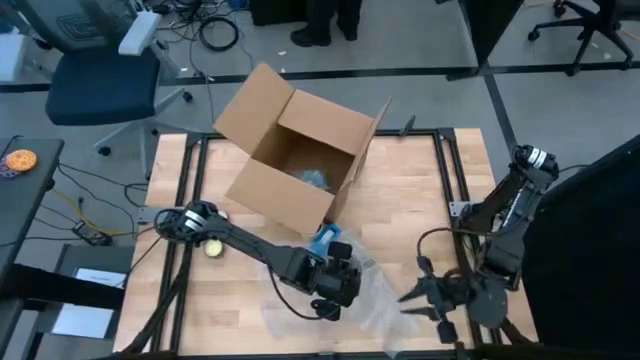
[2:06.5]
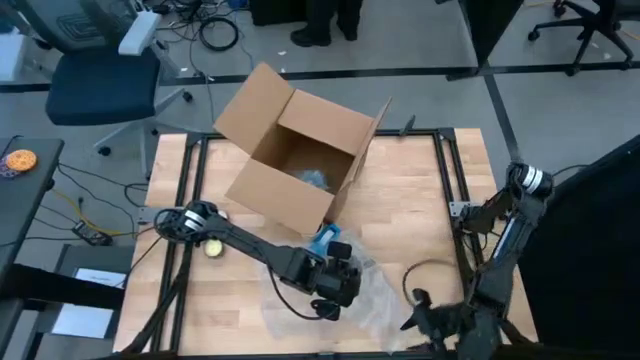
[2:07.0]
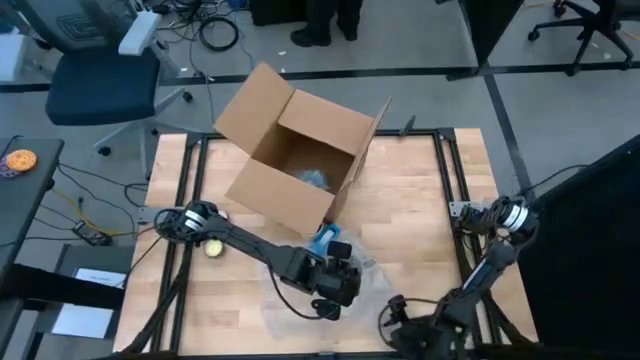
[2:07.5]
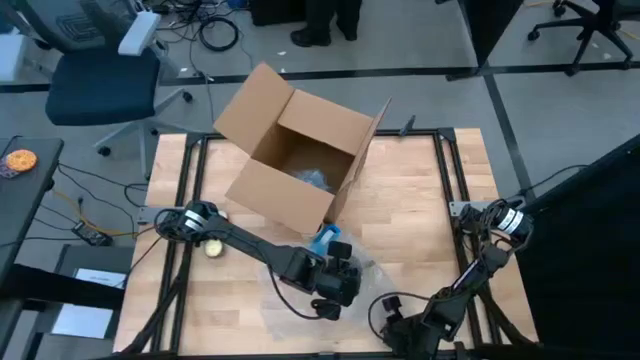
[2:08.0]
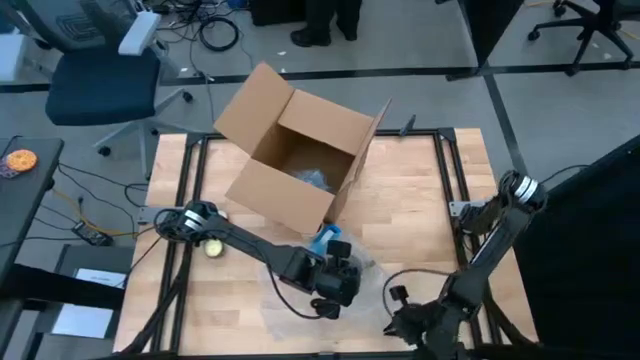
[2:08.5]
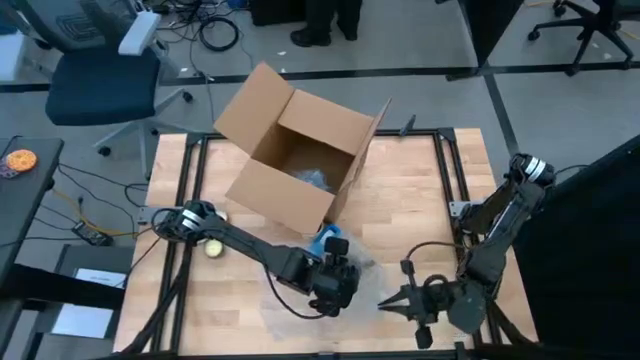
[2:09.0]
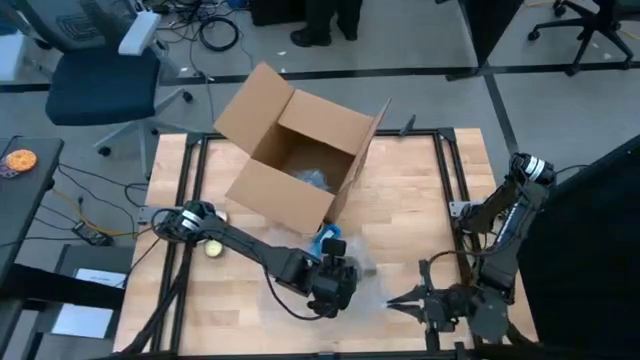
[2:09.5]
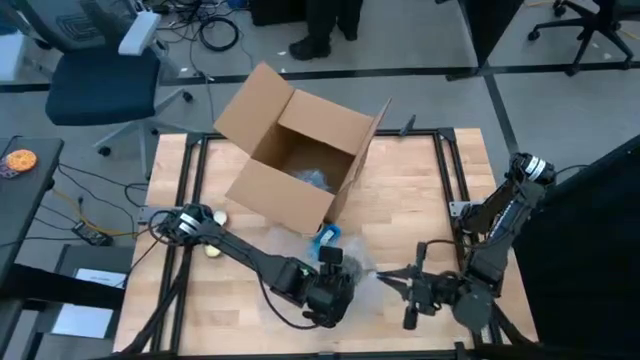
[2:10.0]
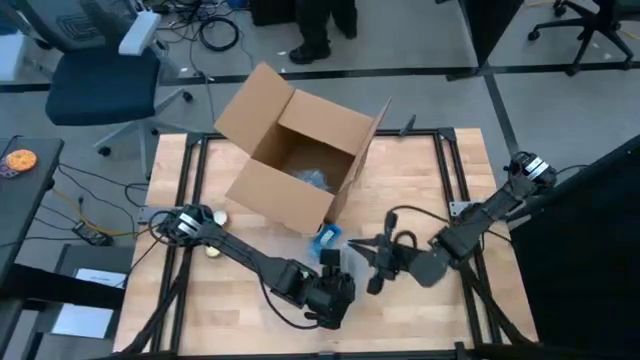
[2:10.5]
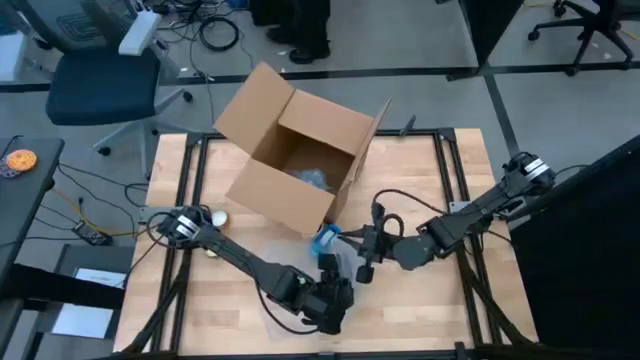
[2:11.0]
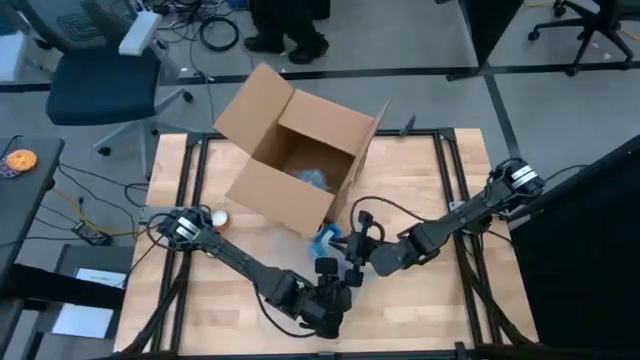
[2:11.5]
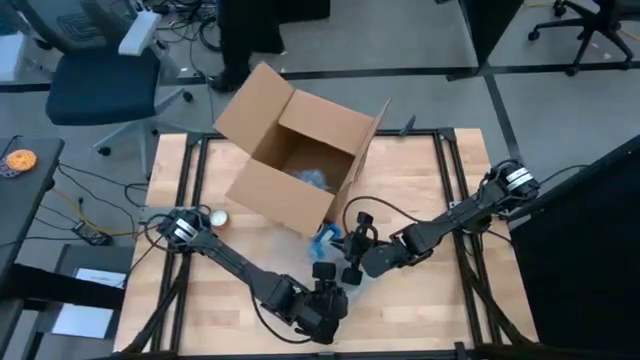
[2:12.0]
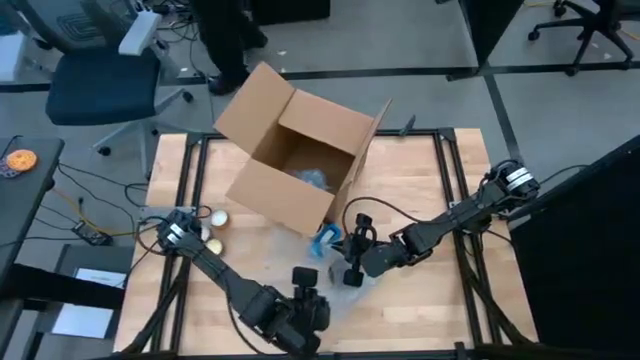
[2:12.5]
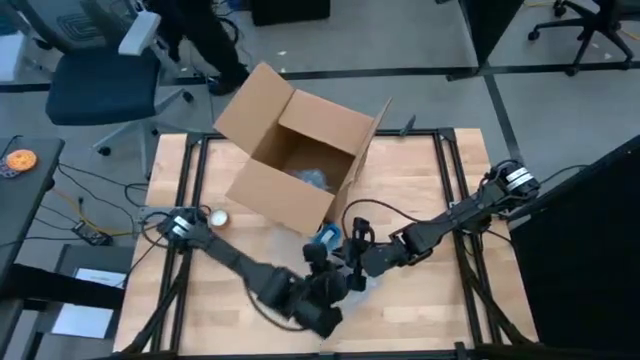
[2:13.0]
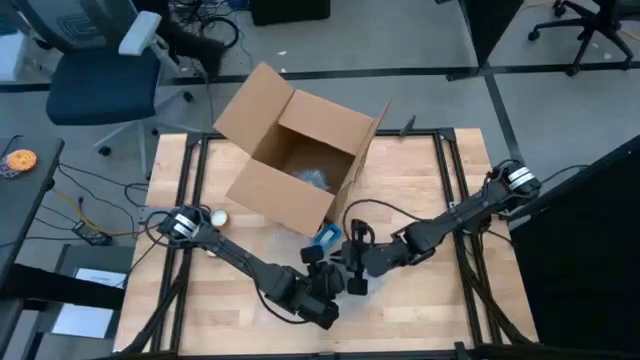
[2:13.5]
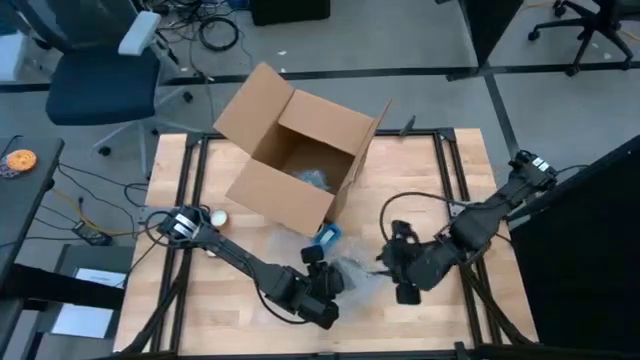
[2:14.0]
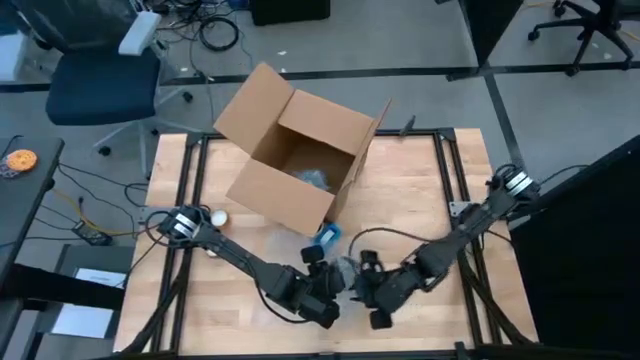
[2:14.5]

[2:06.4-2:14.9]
Task: wrap mug
Wrap the brown mug with the bubble wrap on the table

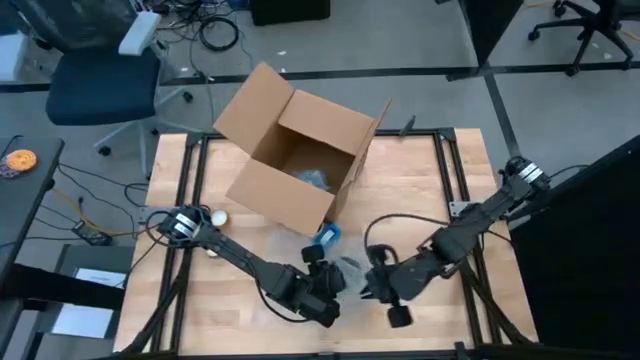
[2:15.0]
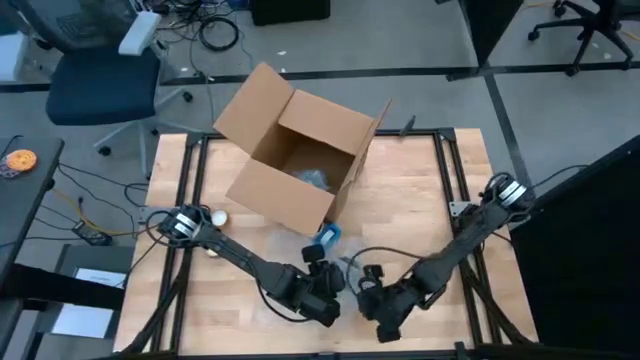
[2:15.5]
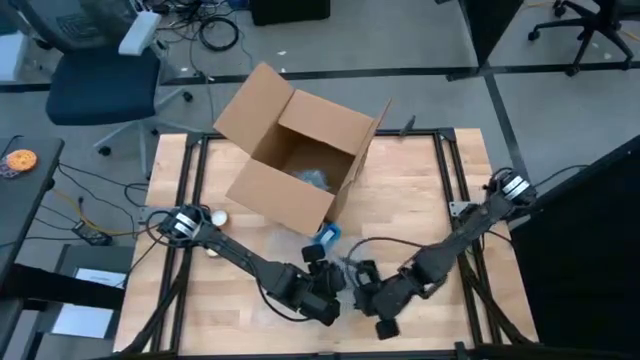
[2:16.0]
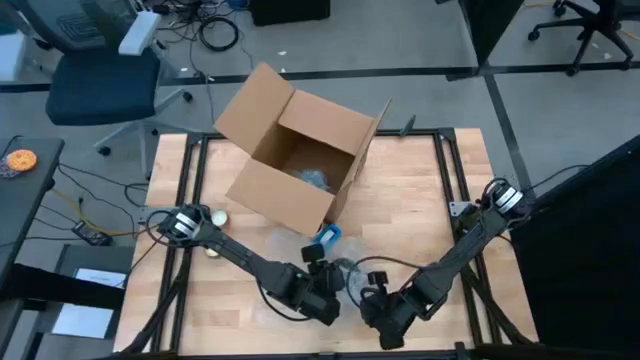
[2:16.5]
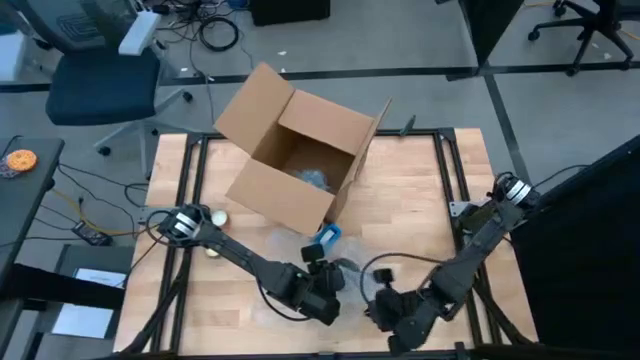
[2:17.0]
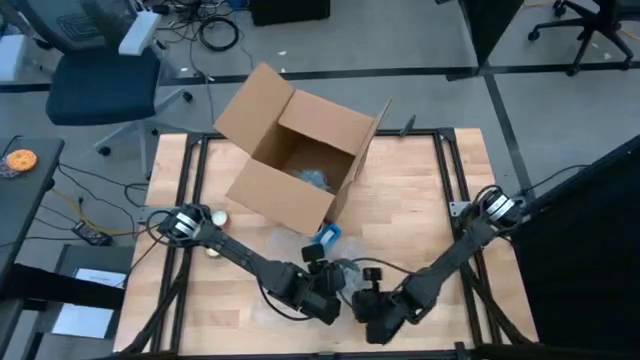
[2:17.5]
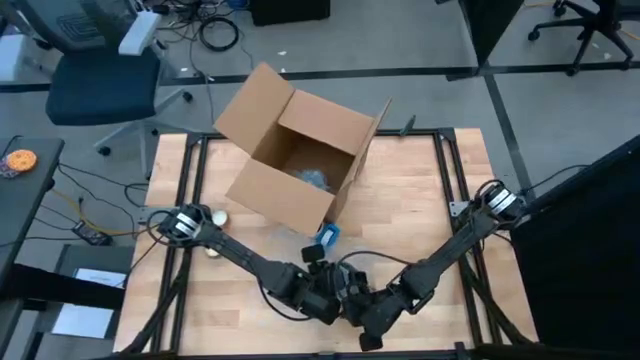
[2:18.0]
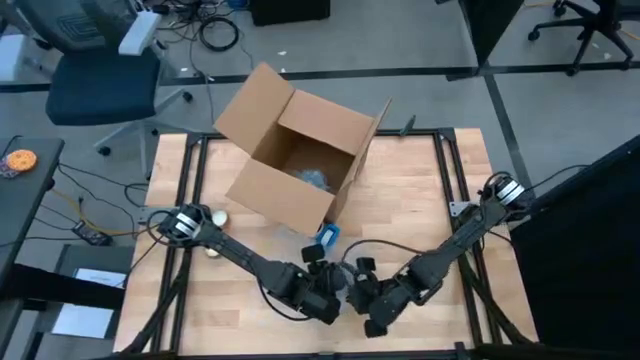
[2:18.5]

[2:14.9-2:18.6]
Wrap the brown mug with the bubble wrap on the table
